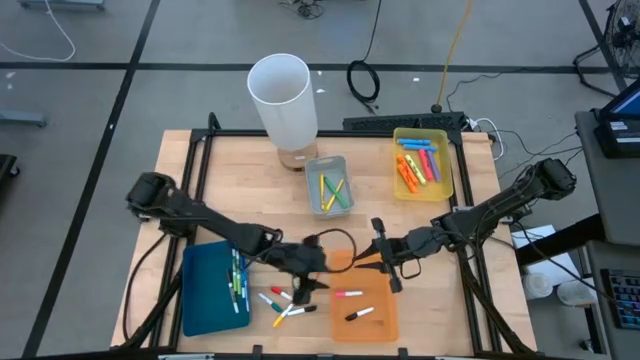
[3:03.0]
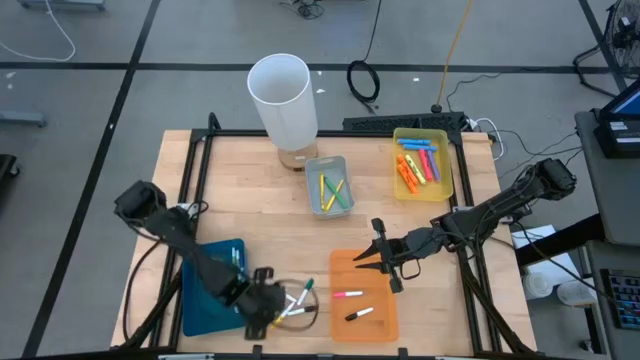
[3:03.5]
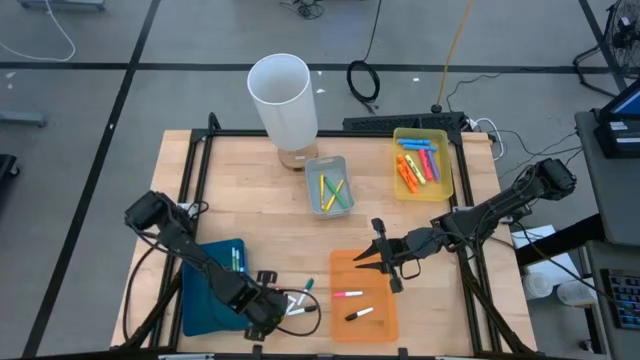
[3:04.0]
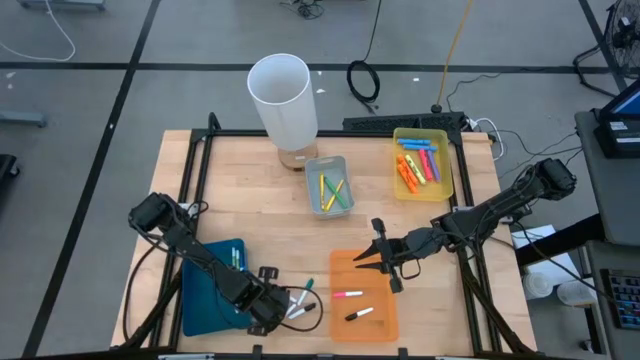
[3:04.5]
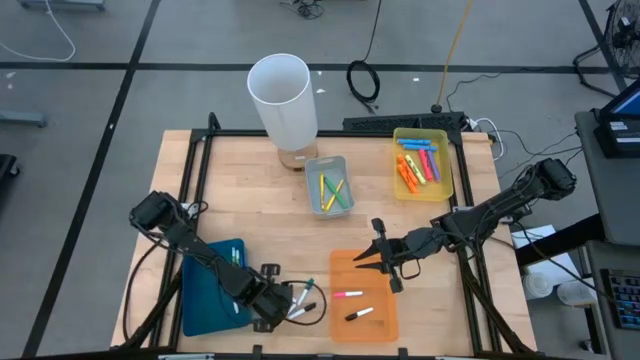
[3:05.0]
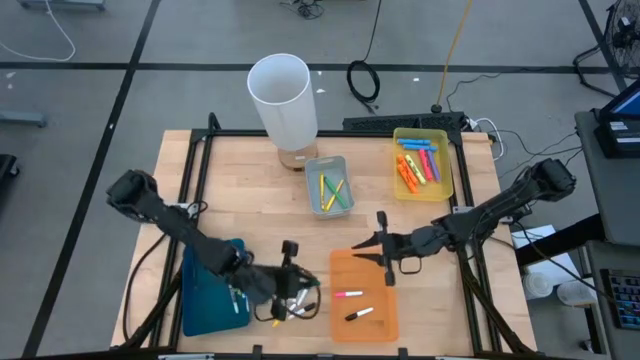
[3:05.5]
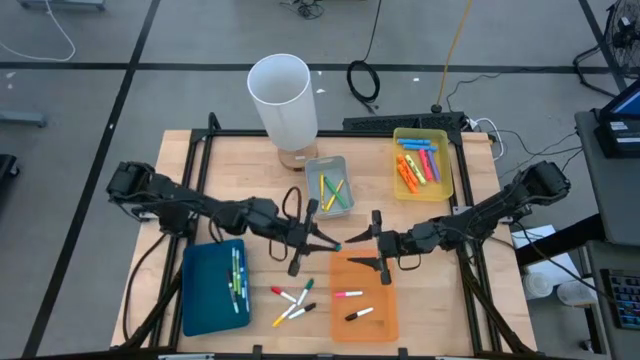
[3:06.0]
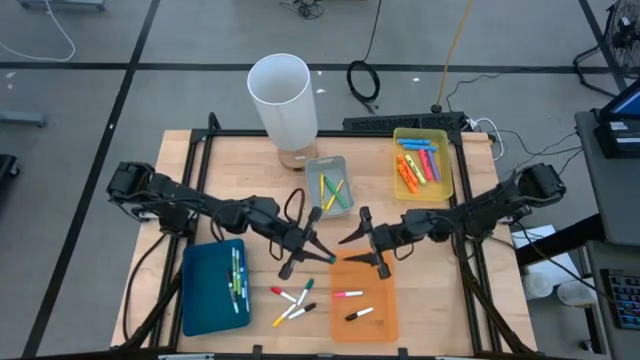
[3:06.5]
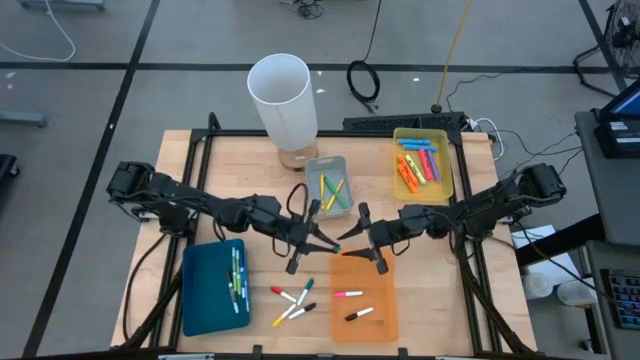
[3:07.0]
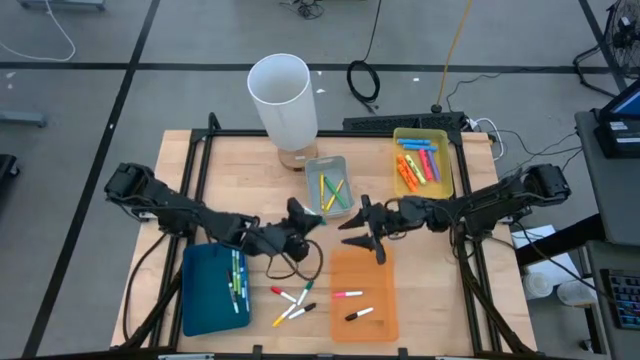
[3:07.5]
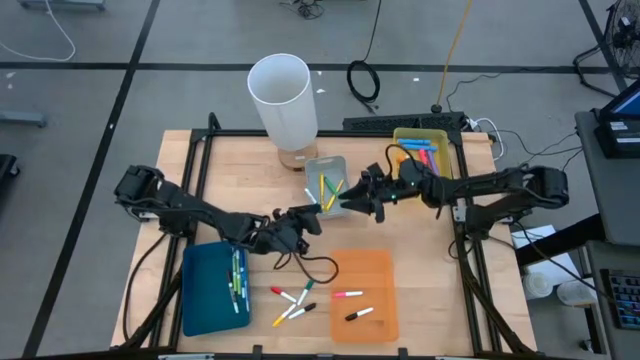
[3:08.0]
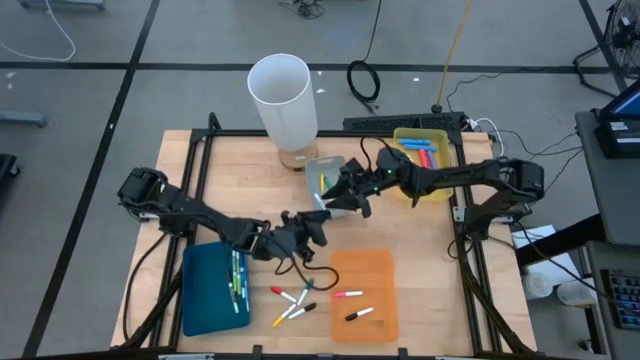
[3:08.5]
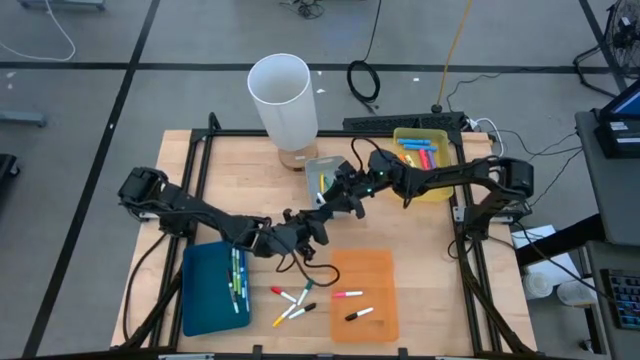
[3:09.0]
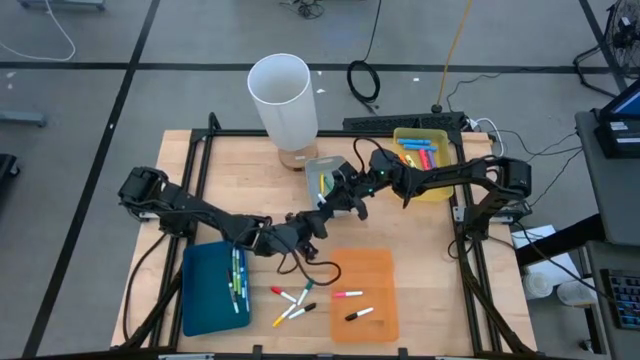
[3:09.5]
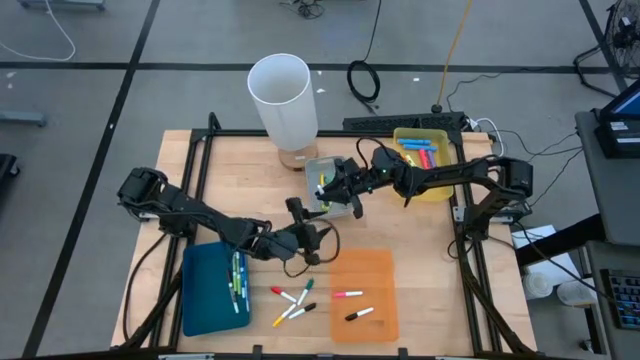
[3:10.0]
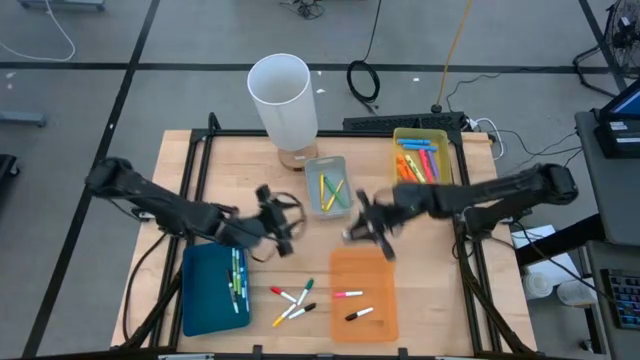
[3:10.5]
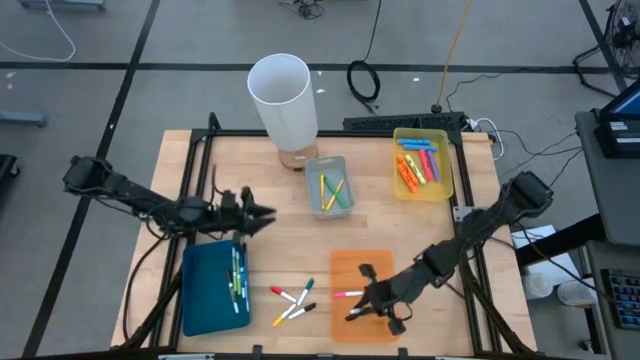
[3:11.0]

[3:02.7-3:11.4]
Task: Pick & Place Markers
Put the left small green highlighter pen in the orange bin

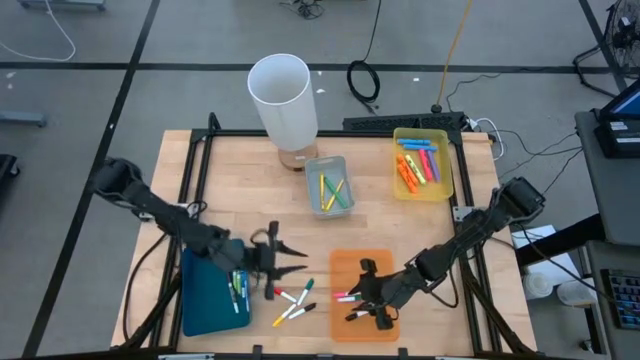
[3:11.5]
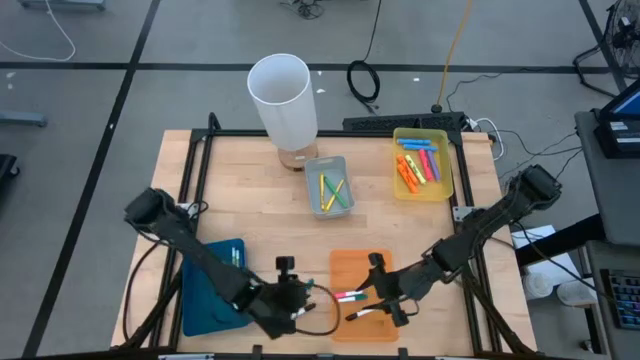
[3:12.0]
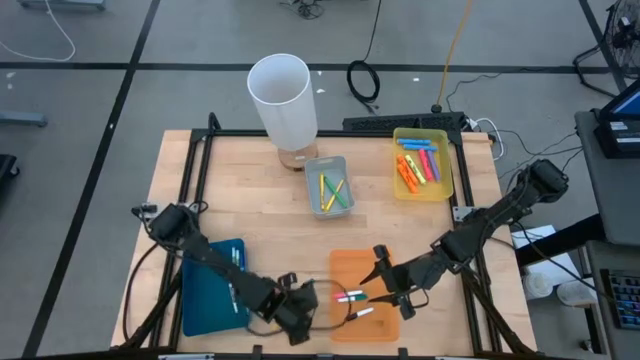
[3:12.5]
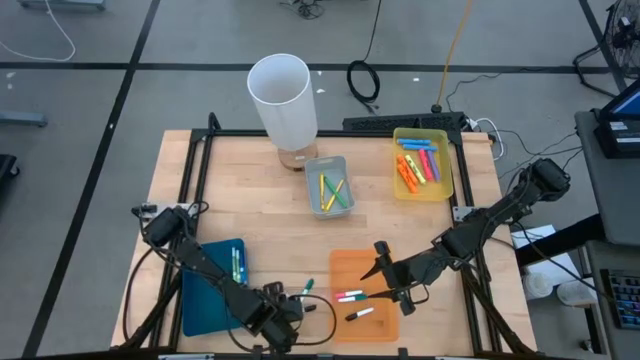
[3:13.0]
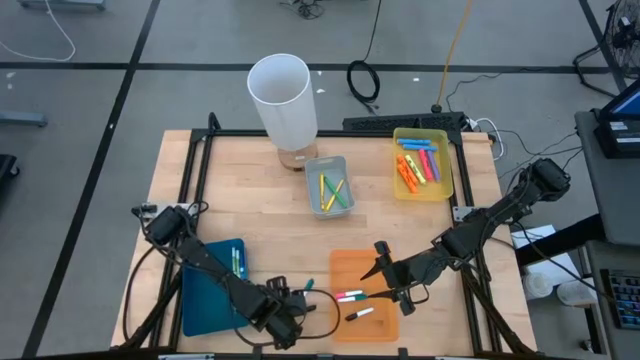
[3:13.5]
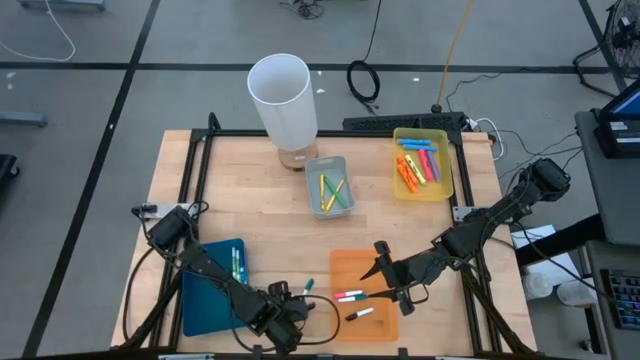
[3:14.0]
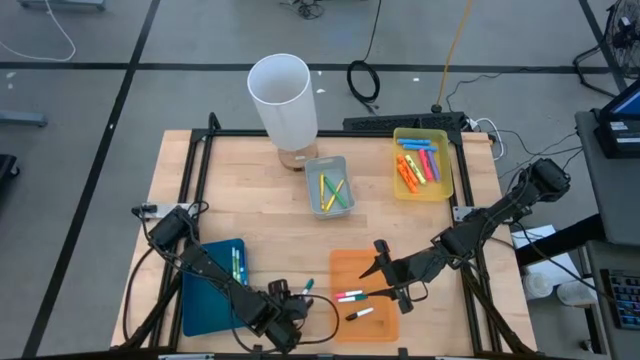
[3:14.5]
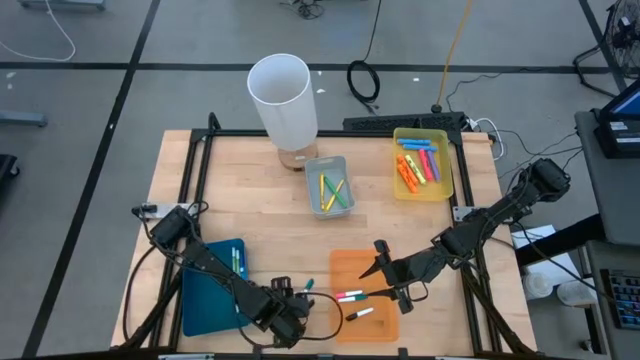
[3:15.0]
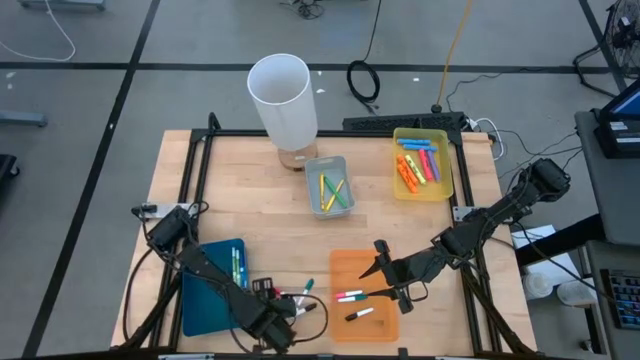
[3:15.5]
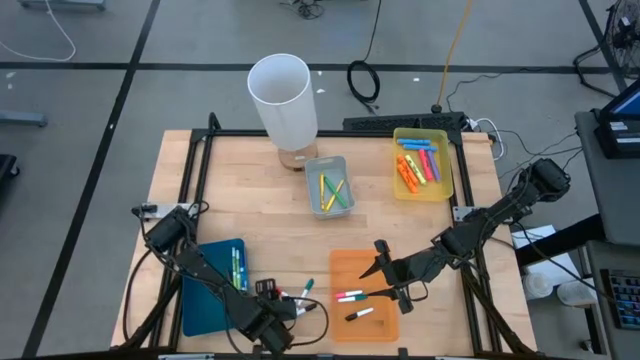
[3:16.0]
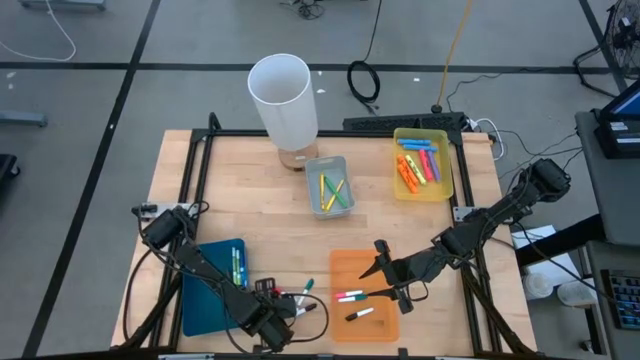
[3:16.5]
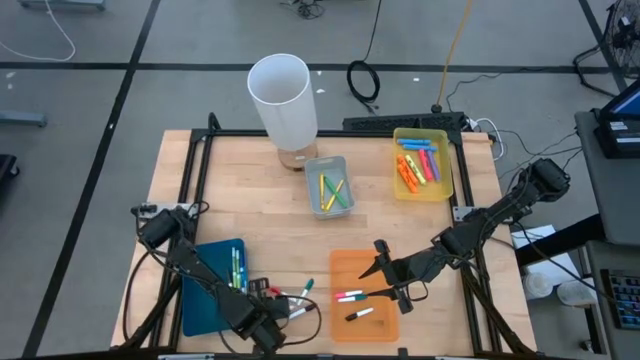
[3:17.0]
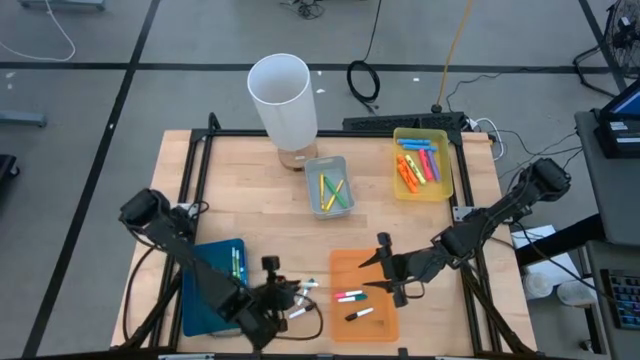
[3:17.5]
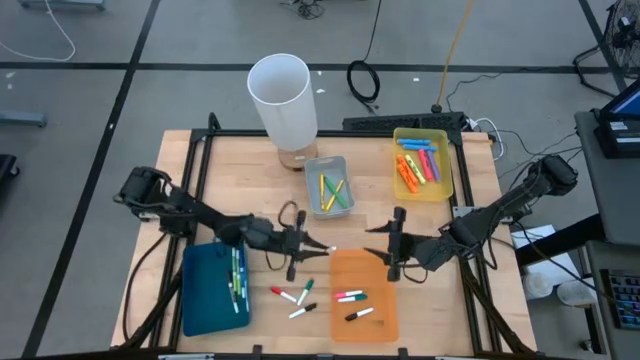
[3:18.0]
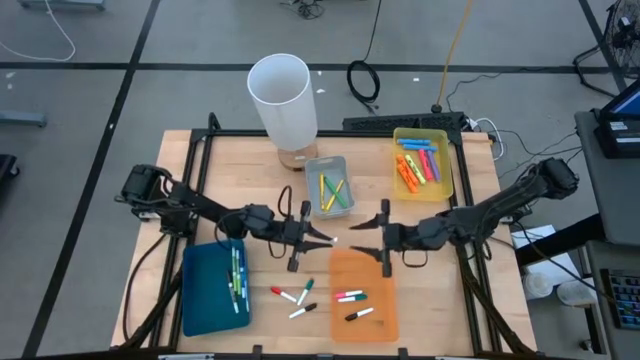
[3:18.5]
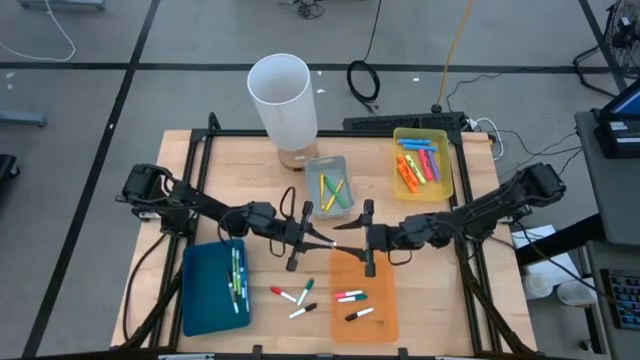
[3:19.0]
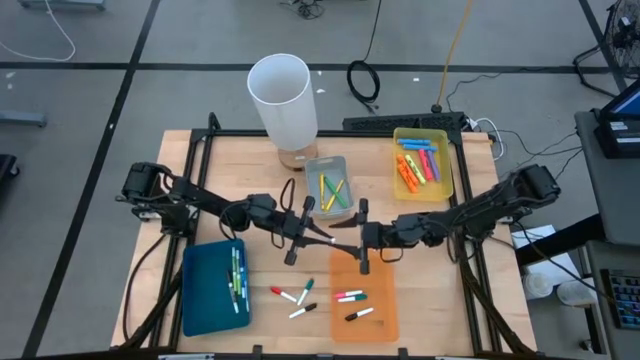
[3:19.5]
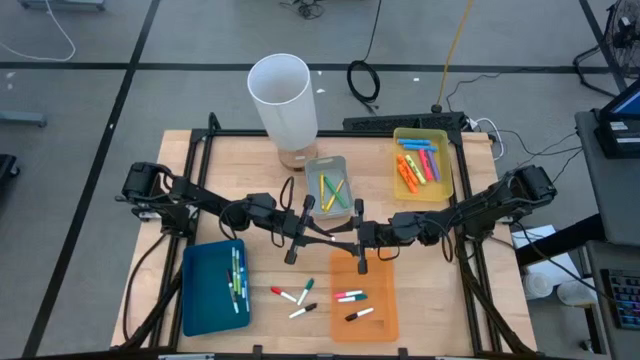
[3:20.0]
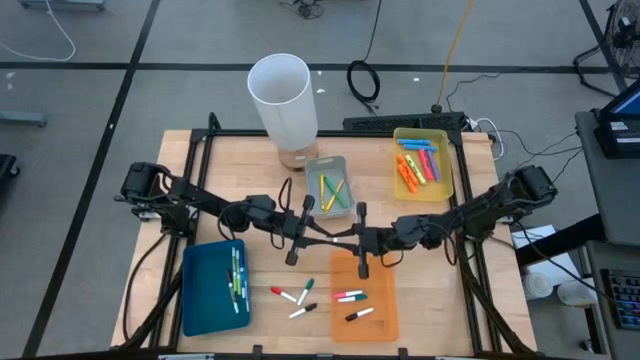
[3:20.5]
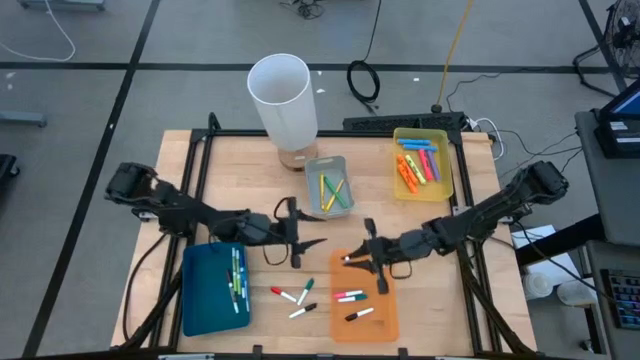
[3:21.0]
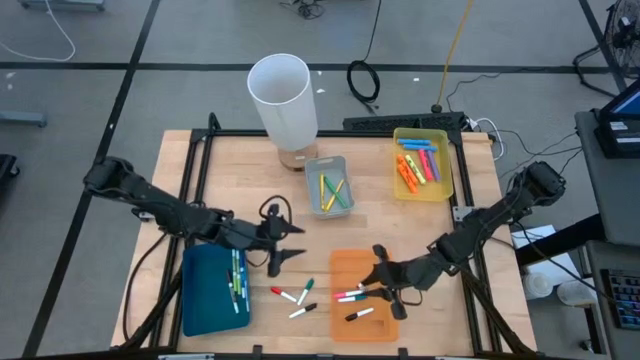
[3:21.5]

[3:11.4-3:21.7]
Put the small yellow highlighter pen in the orange bin

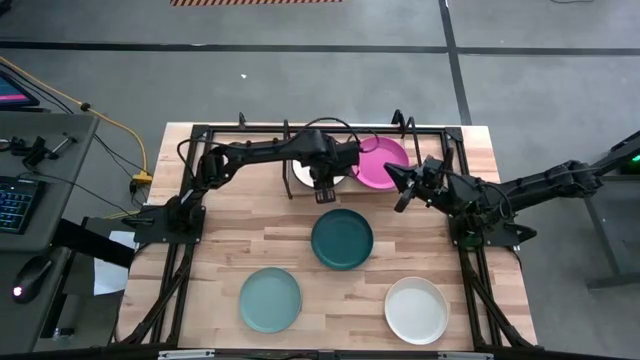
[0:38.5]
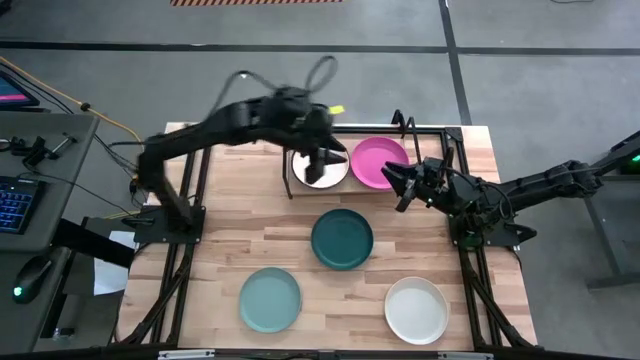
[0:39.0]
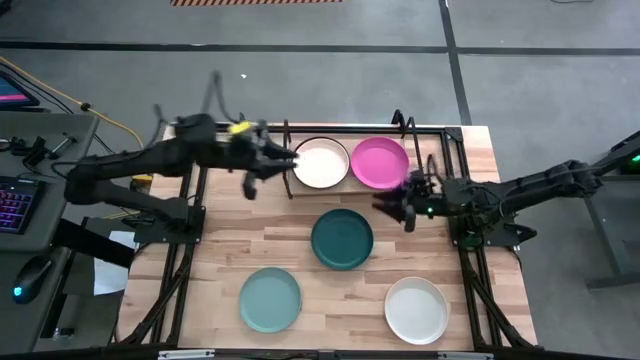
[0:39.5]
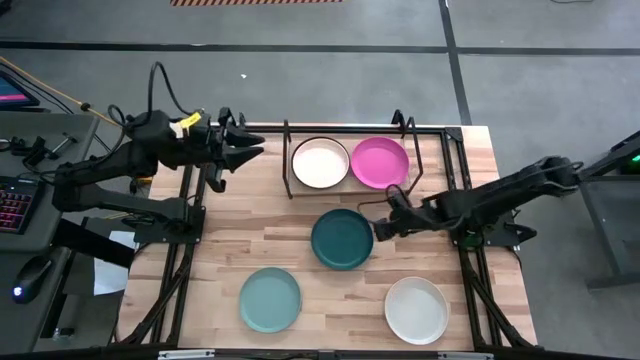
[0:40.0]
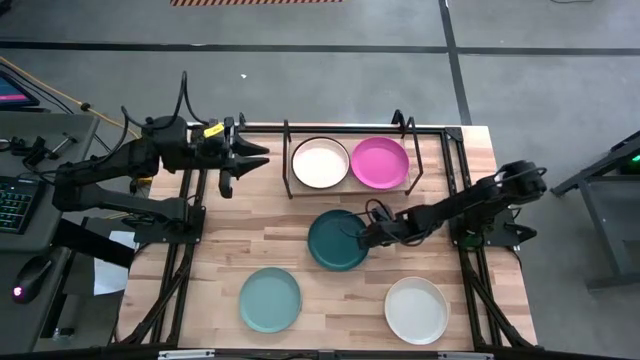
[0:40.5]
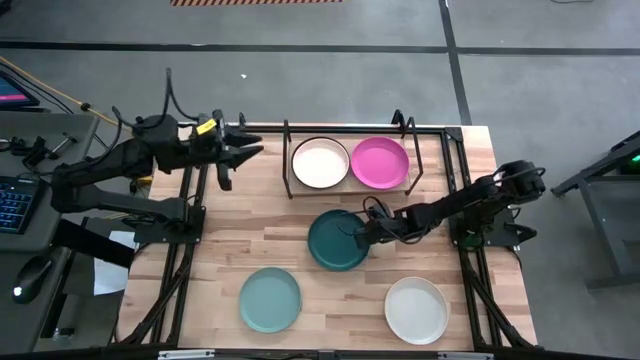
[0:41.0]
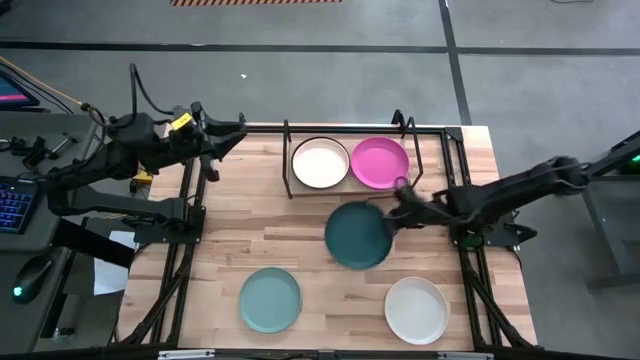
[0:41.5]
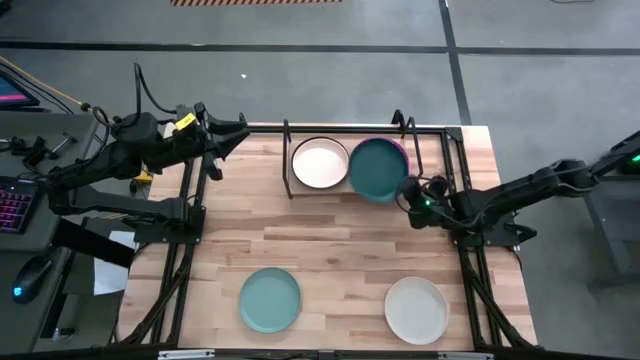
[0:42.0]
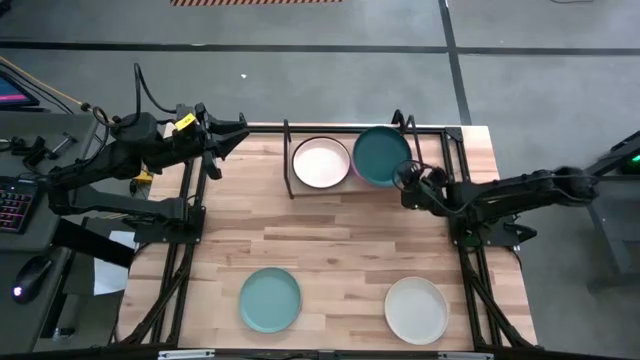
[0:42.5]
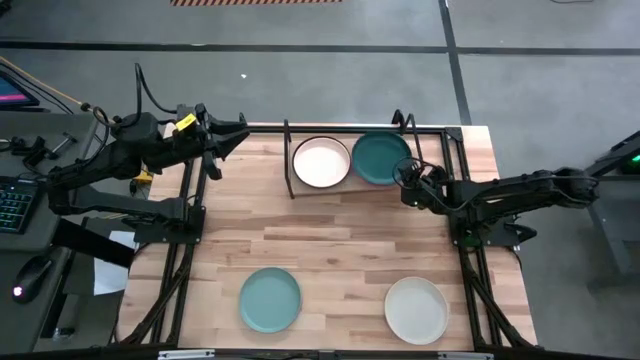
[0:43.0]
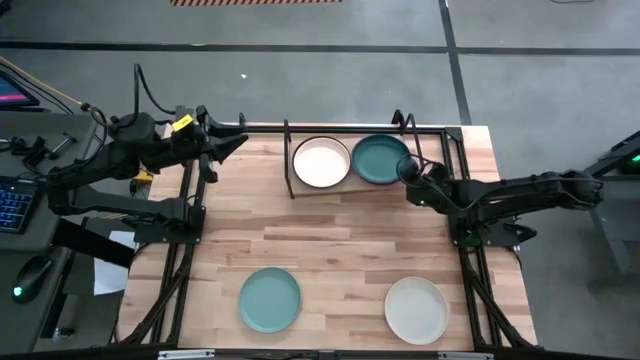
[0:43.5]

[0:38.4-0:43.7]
Task: Place and stack plates onto a shelf
Stack the green plate on top of the pink plate on the shelf
